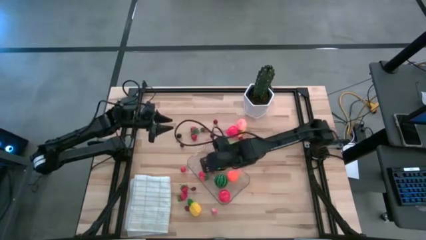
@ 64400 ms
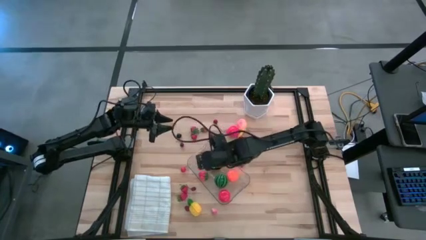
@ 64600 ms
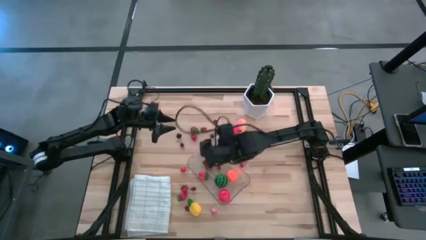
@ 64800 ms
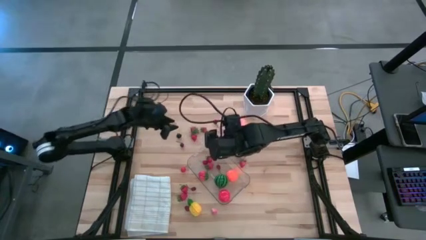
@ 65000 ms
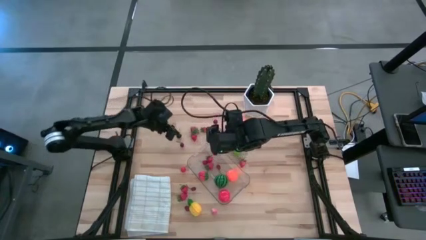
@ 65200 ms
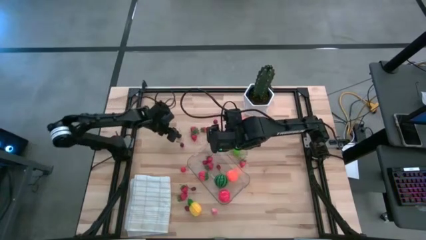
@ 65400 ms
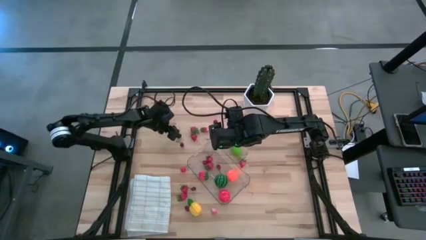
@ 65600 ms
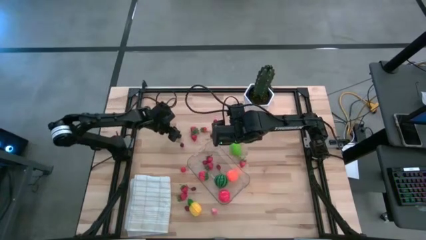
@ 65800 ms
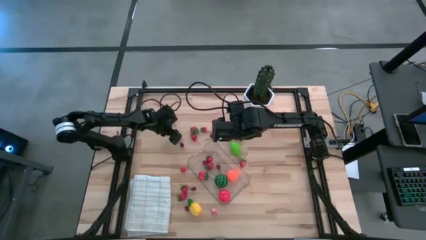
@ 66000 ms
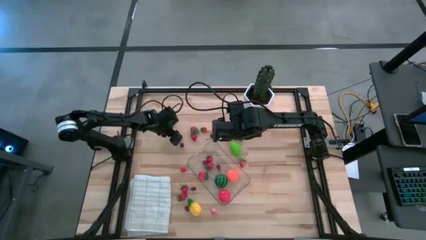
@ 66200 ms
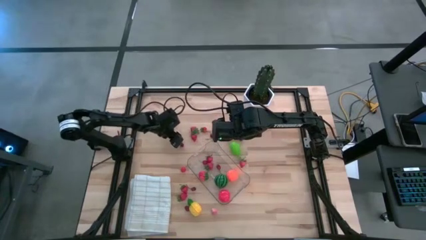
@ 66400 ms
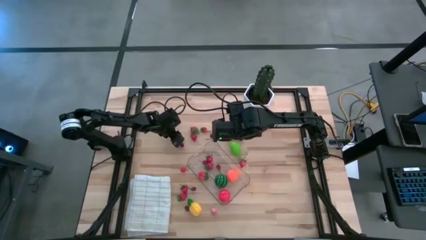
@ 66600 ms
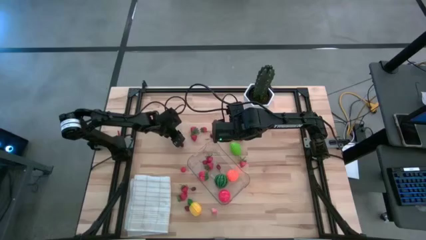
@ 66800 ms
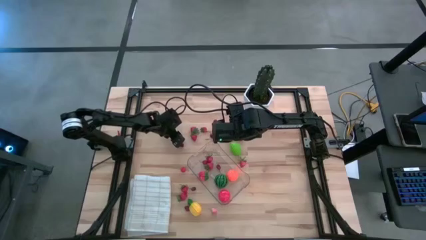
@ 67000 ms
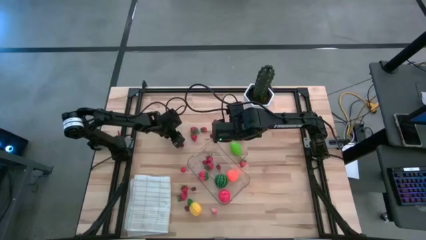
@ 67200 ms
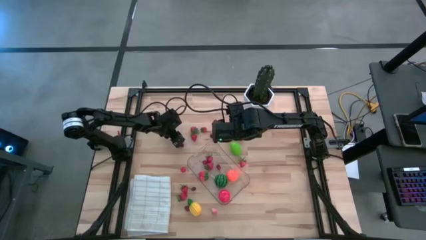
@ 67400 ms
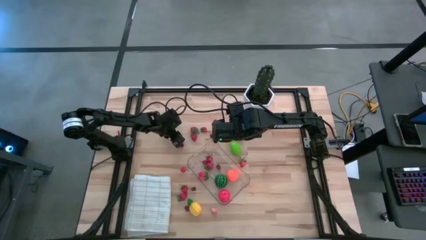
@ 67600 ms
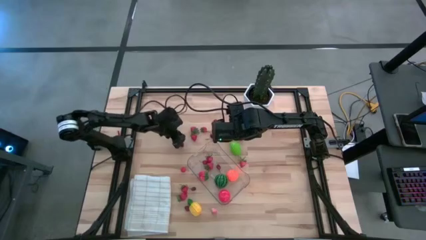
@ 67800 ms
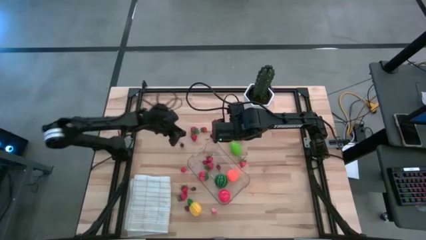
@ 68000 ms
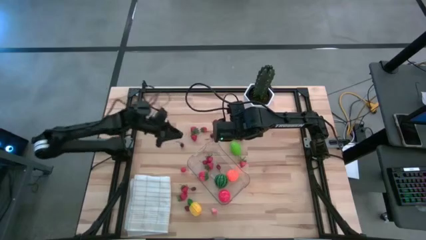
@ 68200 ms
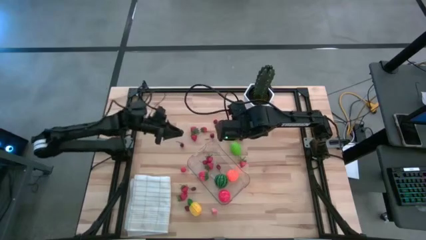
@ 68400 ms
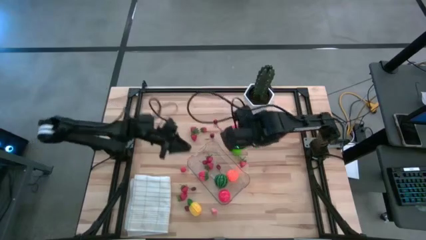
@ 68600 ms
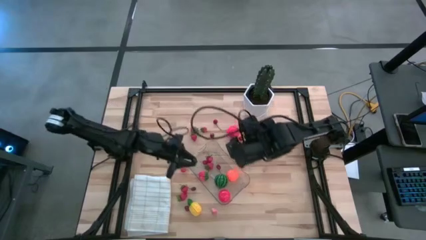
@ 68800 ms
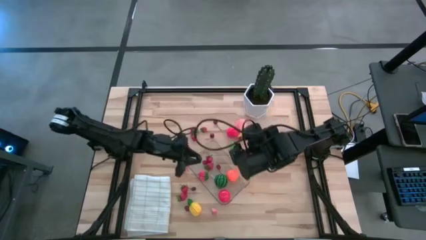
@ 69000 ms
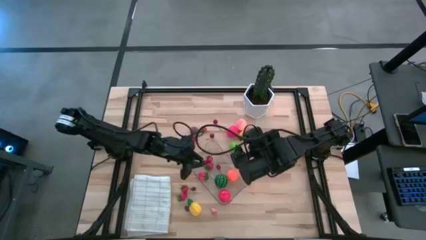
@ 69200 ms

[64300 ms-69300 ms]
Task: Pick and placing Produce into tupperware
Put the black cherry into the transparent bin

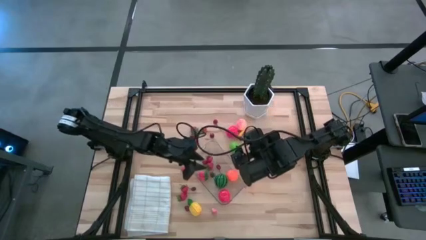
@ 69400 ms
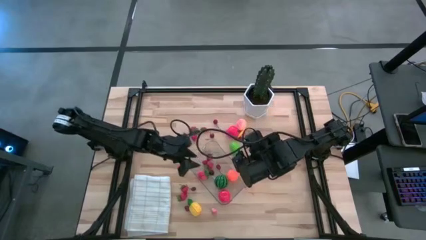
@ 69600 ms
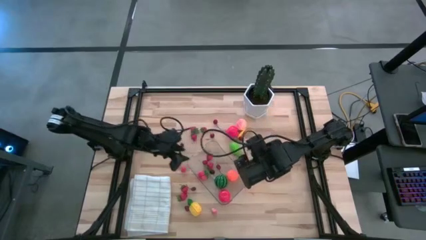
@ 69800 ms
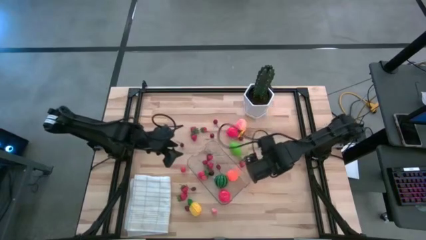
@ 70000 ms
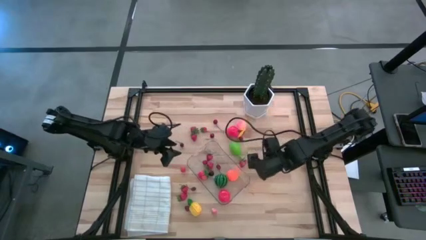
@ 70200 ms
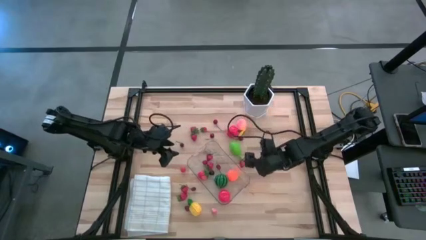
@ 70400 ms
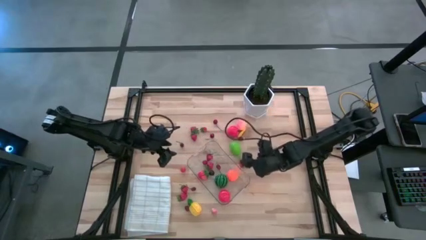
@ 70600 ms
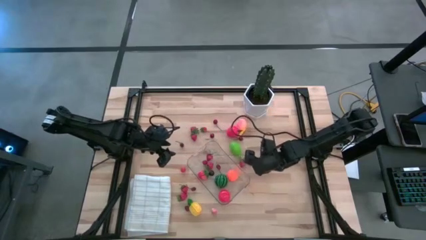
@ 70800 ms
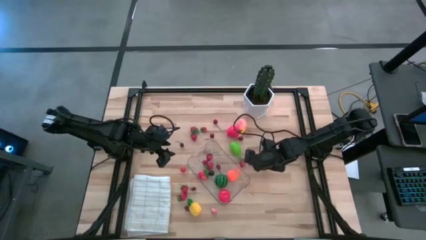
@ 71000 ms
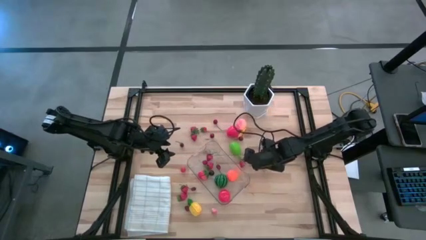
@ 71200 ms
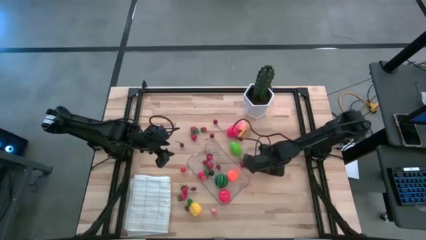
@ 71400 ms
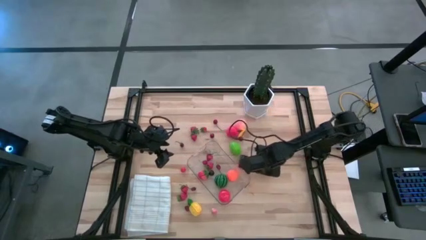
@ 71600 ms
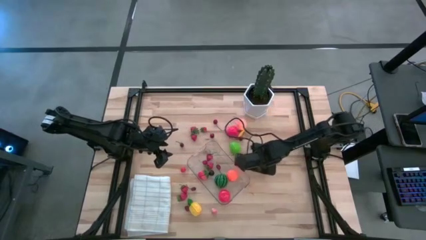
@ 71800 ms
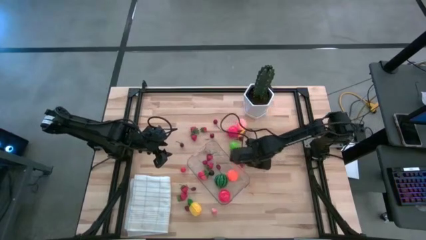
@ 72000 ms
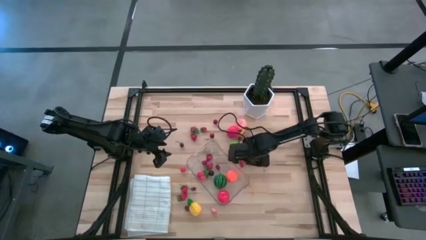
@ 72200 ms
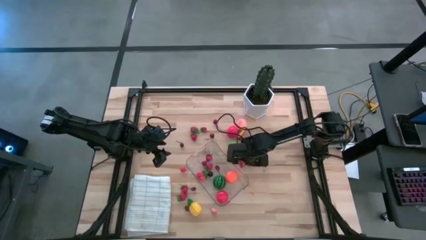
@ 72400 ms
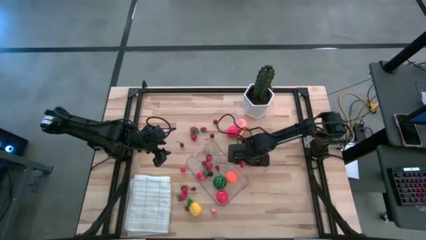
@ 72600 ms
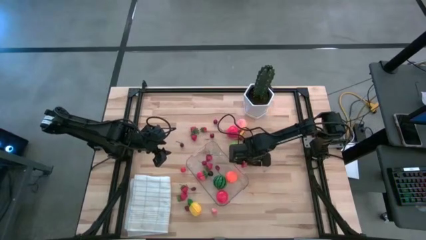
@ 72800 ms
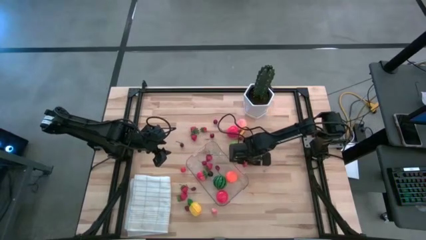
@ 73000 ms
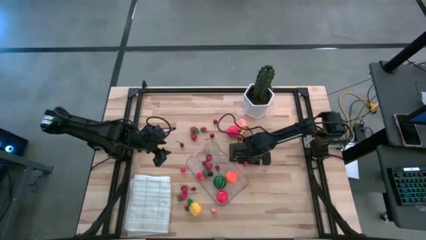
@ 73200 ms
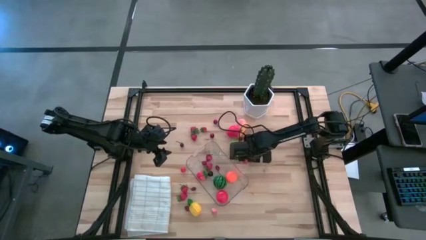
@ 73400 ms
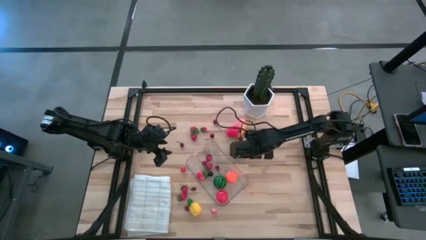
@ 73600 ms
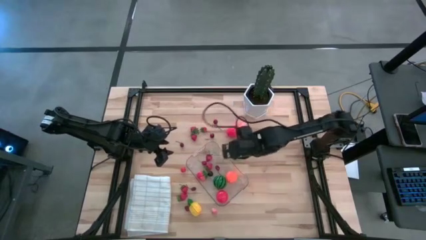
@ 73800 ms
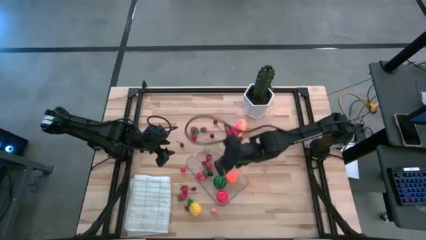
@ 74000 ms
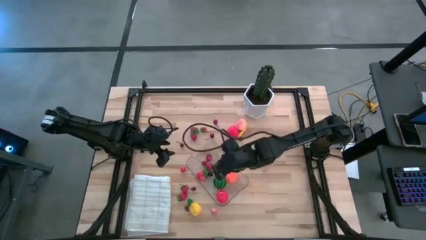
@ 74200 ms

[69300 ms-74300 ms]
Put the red strawberry into the transparent bin

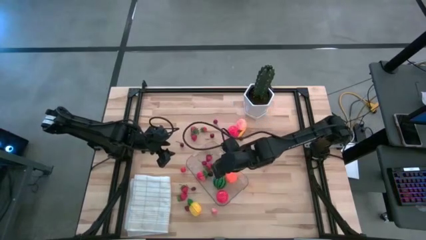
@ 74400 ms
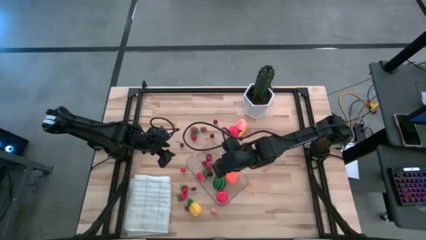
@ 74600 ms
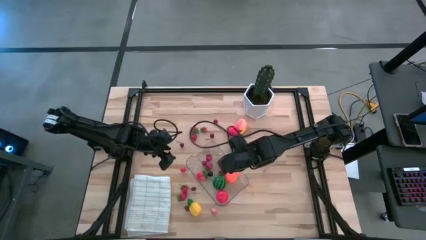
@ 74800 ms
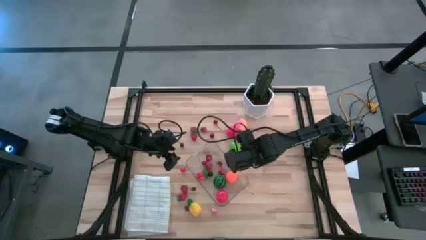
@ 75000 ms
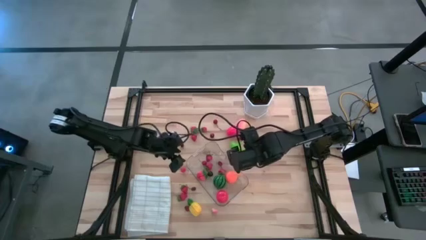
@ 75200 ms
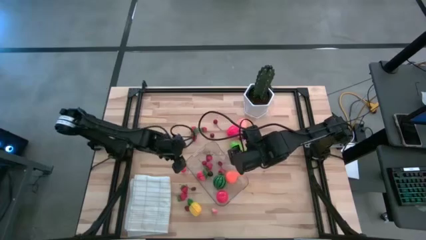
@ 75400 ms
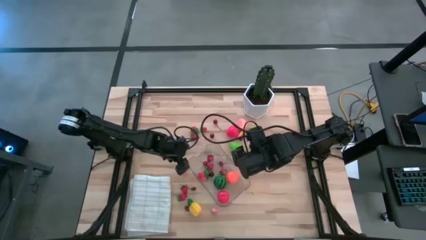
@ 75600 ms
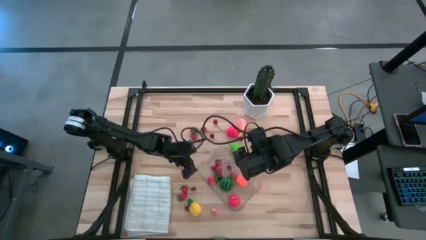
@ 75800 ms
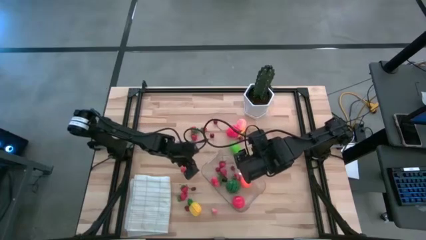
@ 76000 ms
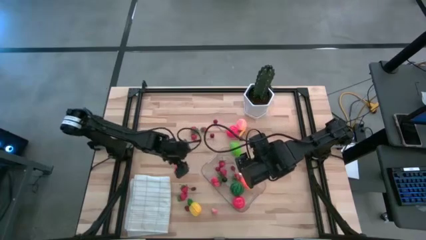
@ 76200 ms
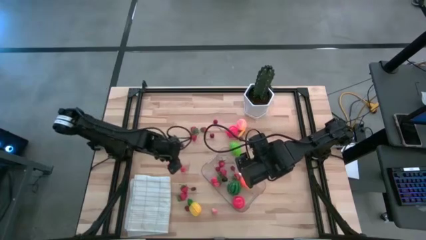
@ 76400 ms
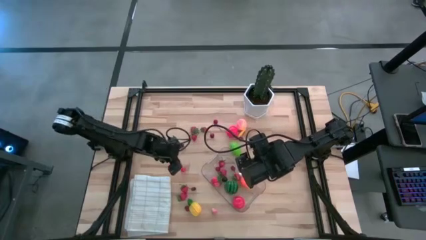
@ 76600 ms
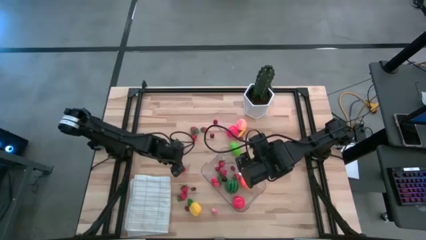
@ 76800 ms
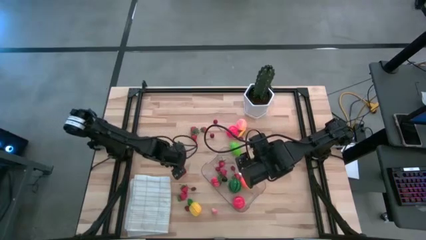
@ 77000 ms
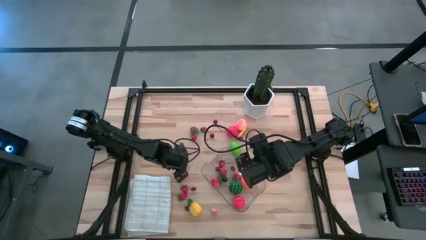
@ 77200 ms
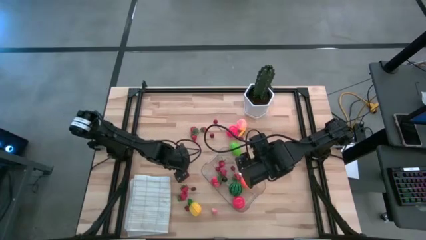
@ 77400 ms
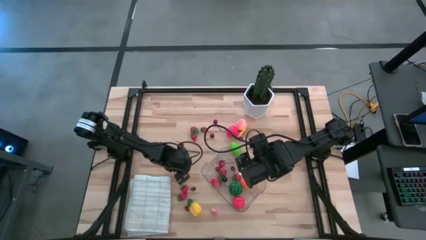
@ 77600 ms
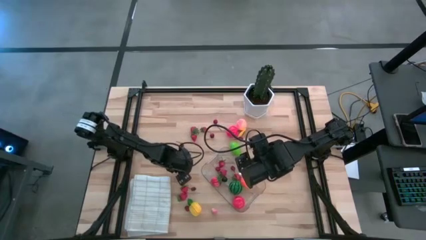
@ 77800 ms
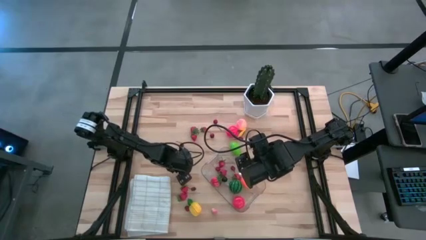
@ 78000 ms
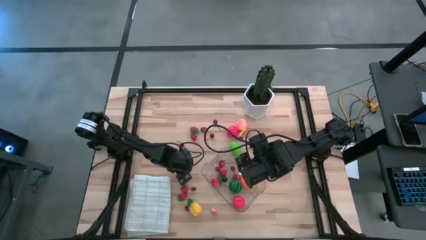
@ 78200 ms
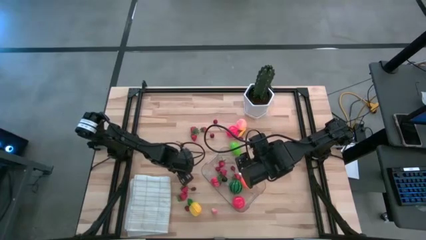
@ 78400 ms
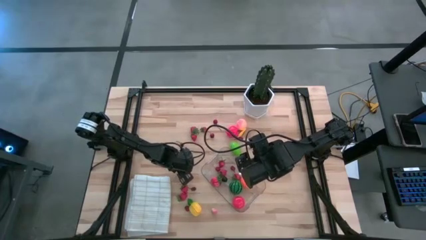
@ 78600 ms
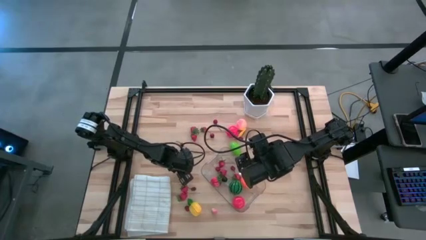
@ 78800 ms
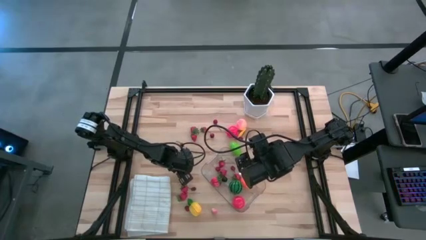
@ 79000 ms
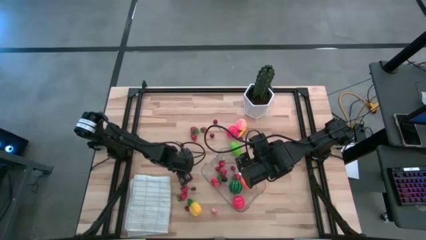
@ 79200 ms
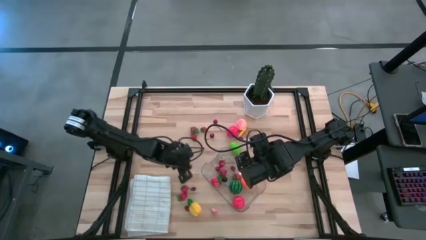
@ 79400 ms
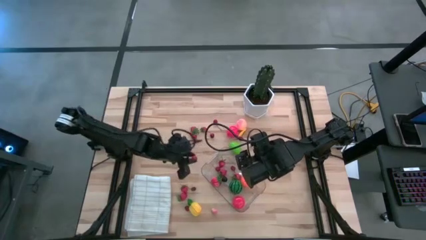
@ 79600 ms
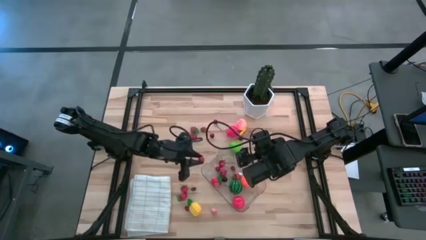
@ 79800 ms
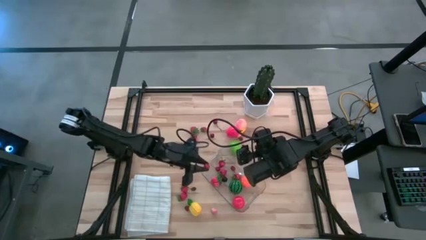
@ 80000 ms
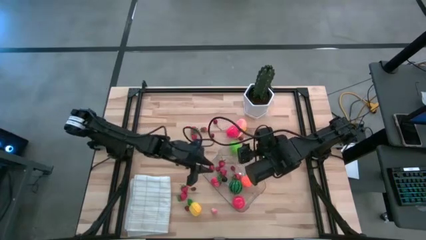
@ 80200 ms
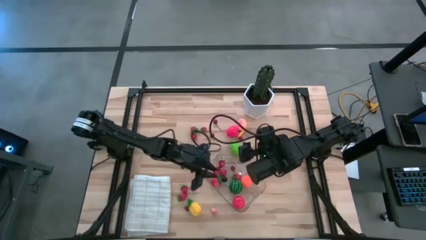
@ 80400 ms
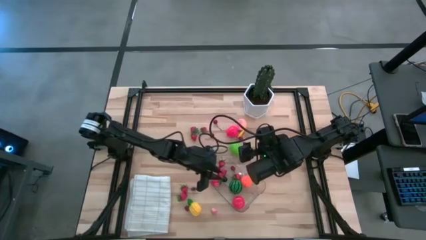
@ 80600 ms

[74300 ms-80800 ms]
Put the red cherry into the transparent bin
